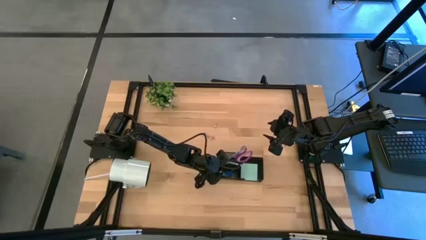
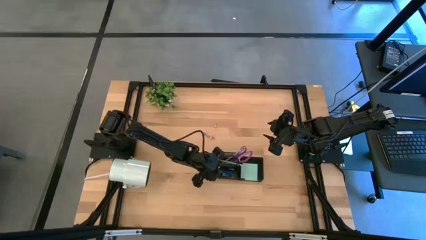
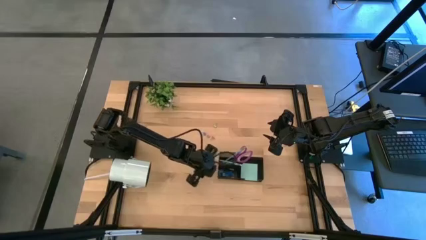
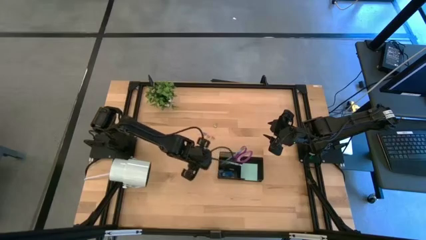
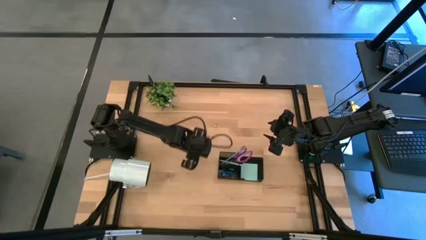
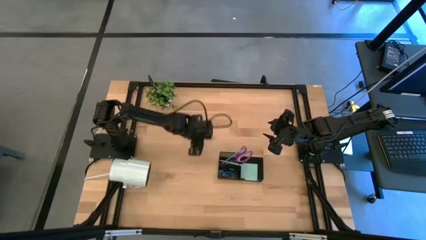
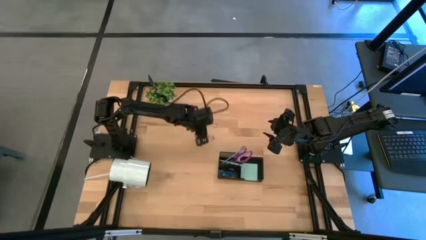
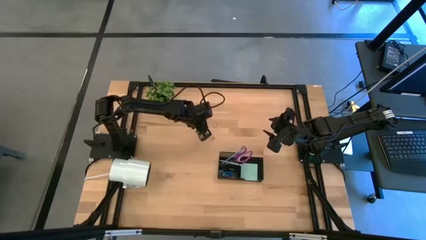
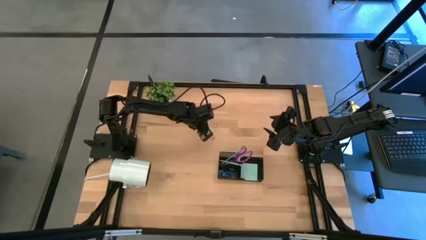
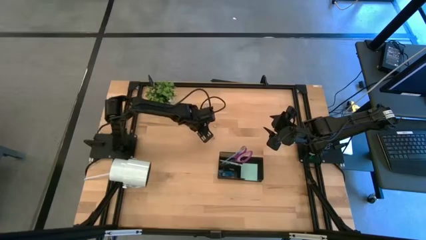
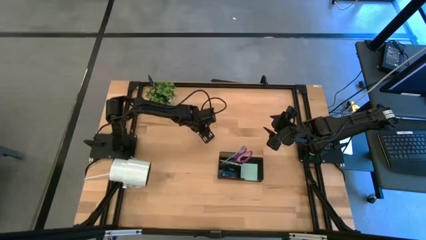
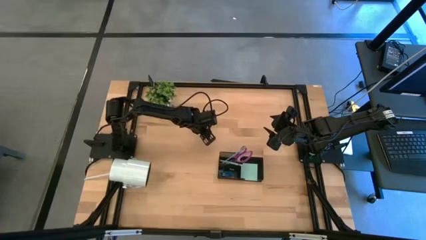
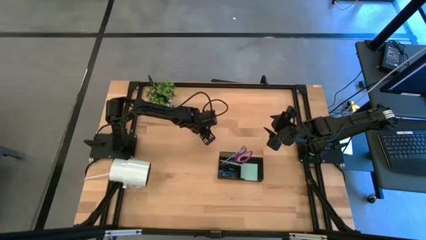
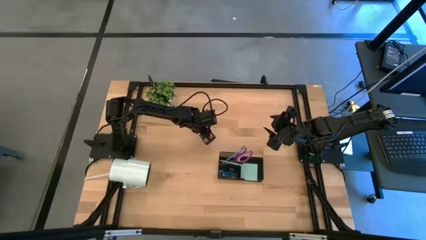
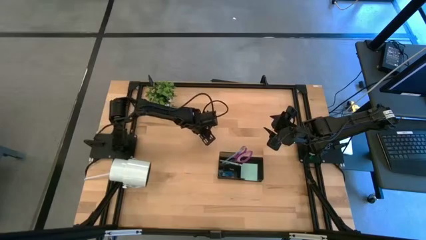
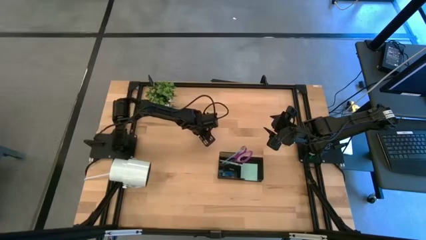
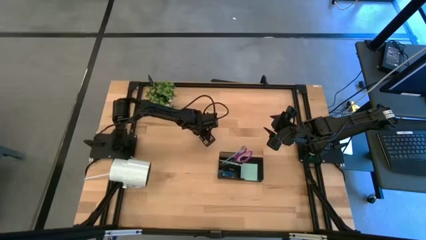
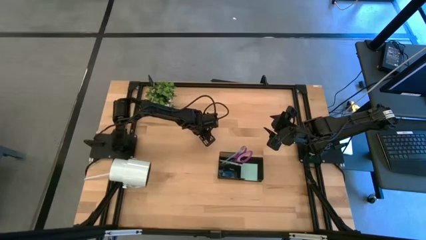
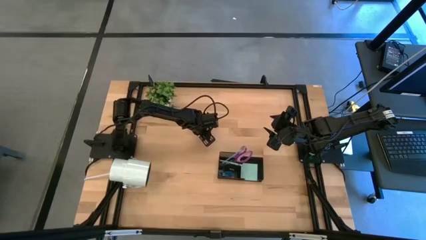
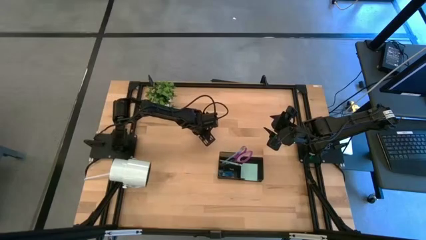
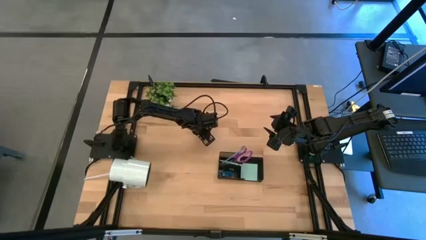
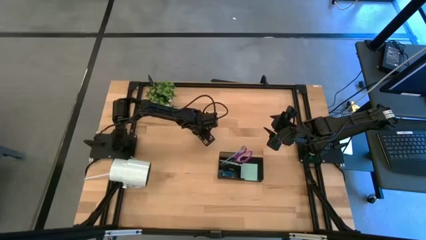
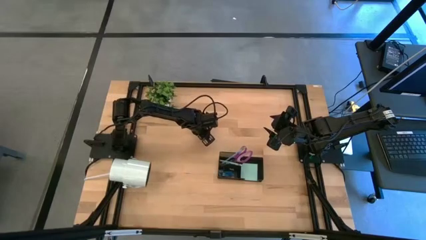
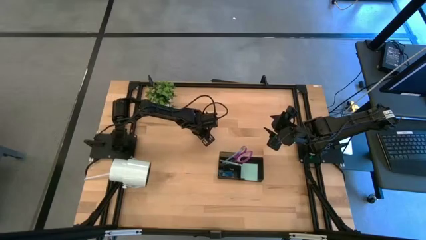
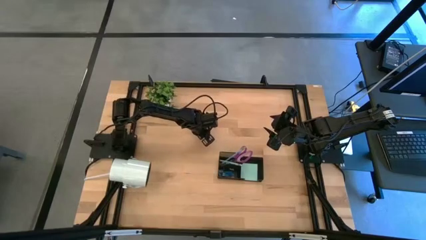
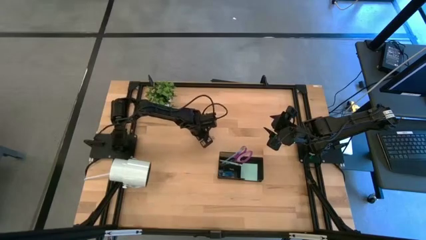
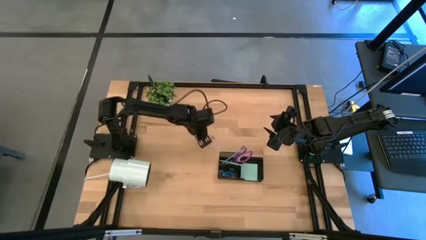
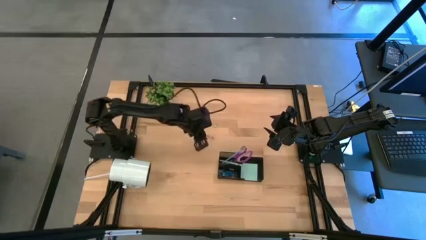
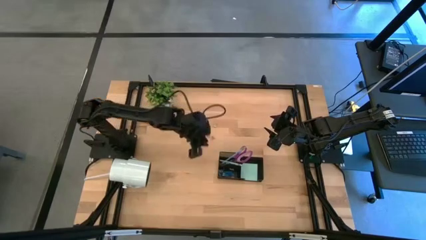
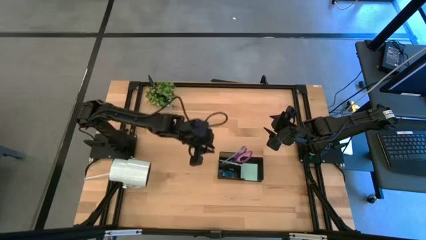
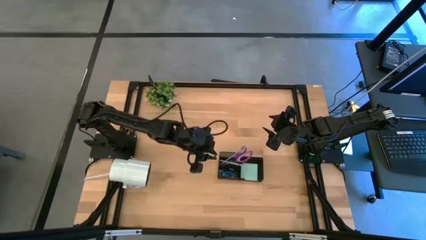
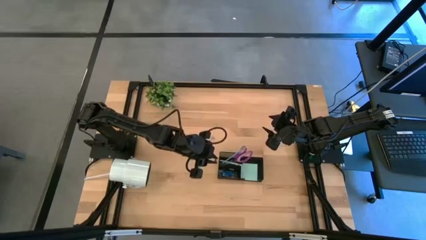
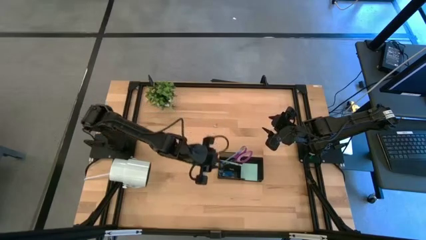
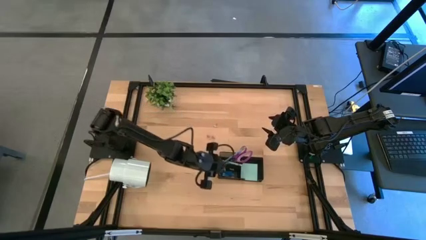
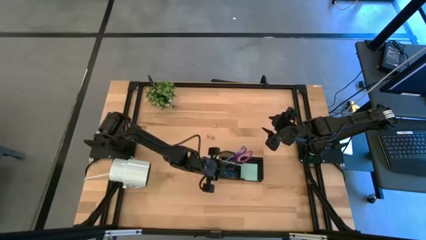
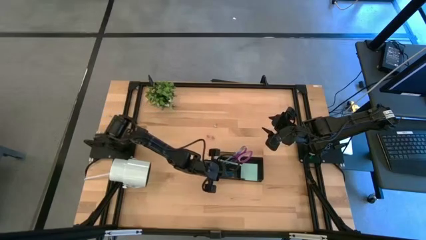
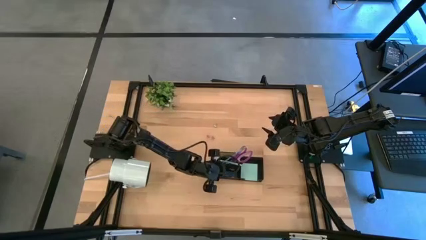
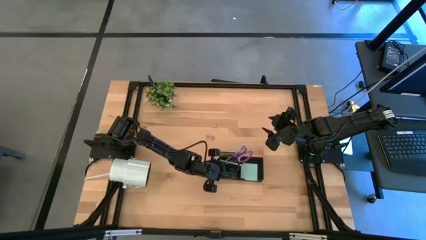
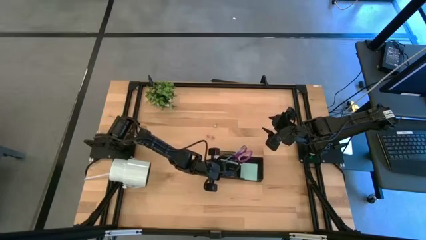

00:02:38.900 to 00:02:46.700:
Task: Pick and place office supplies into organizer
Put the blue binder clip into the desk organizer

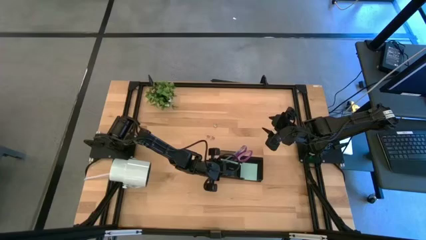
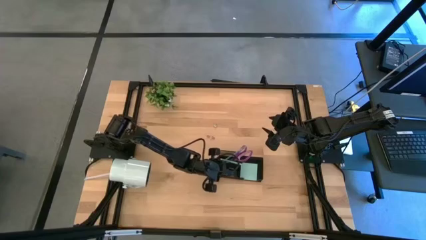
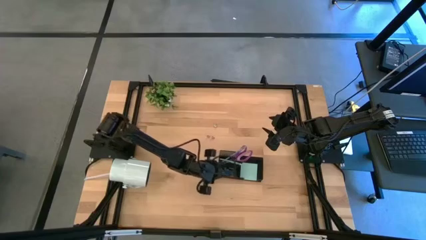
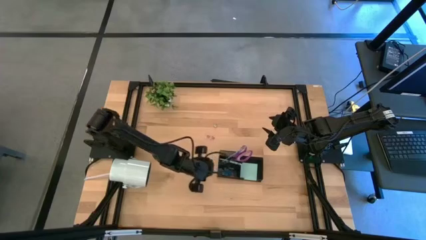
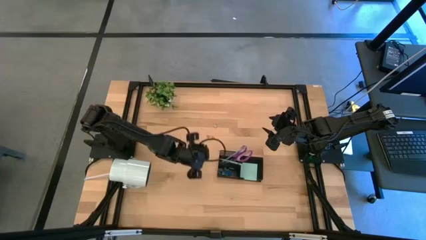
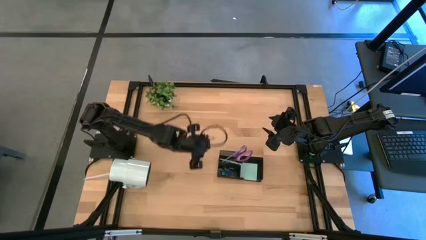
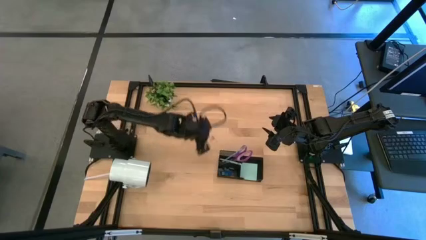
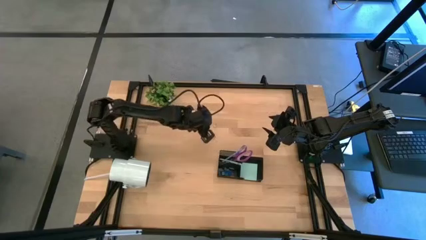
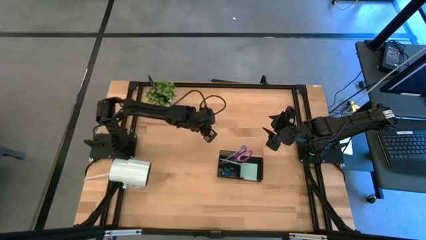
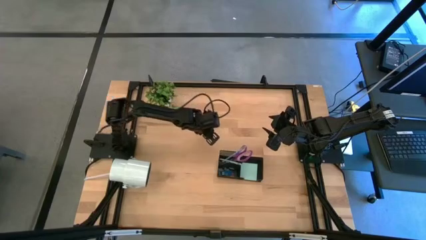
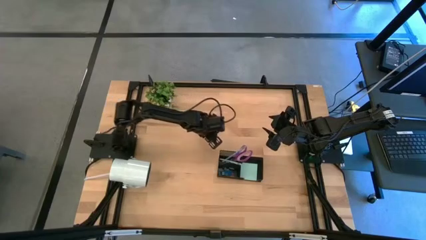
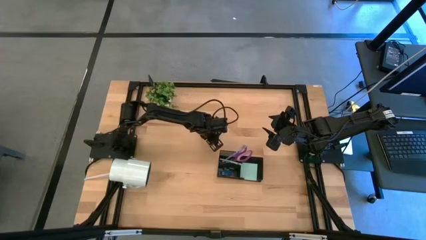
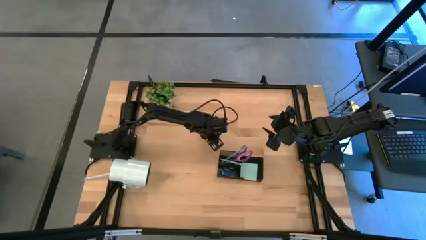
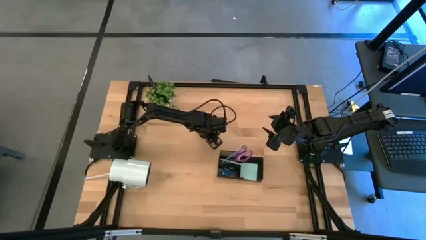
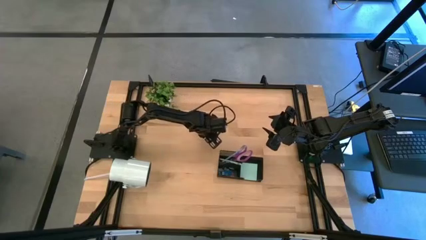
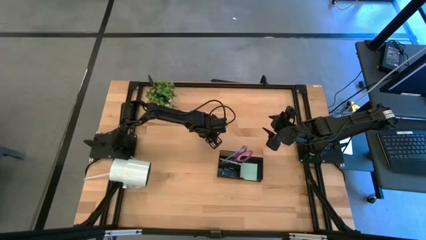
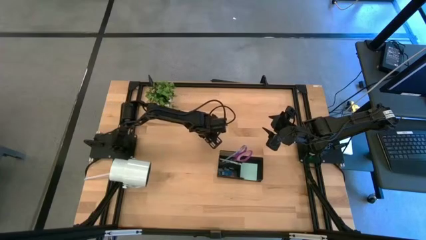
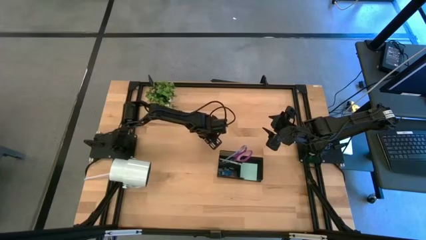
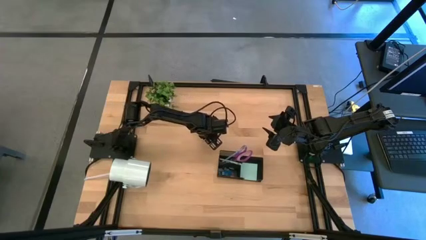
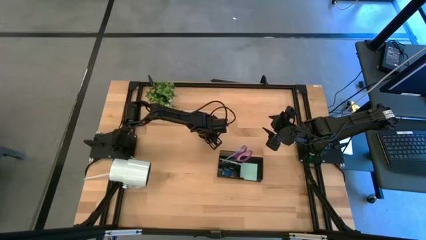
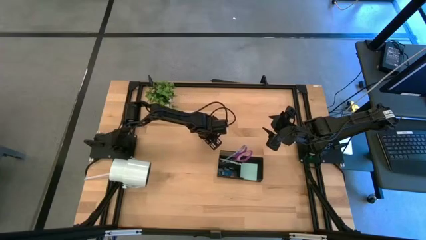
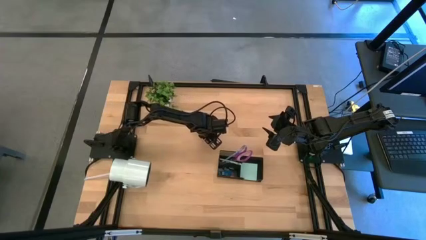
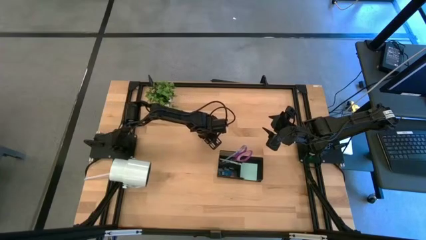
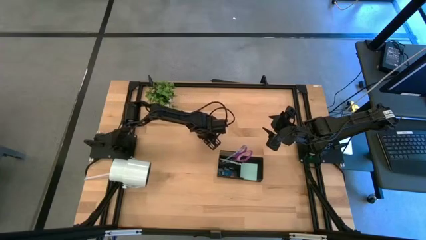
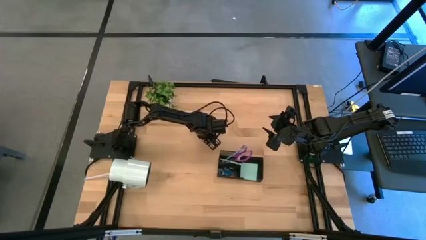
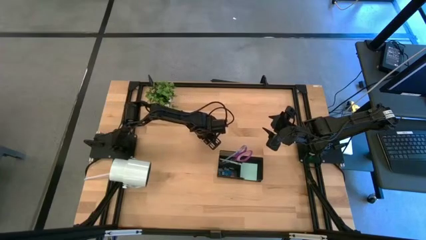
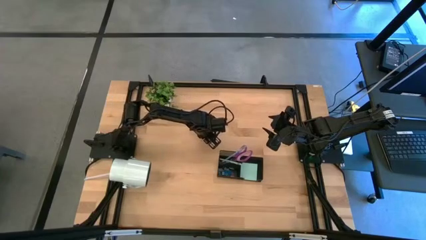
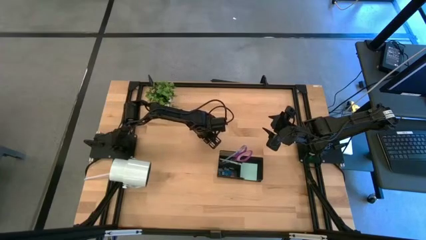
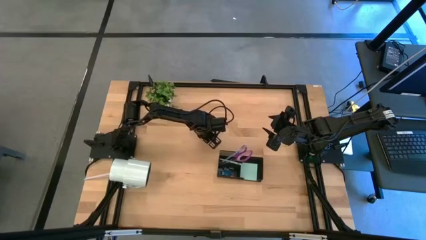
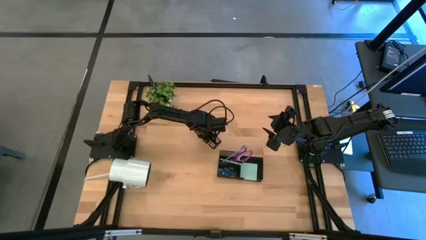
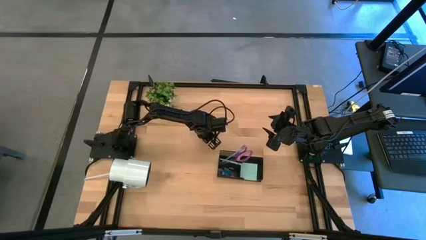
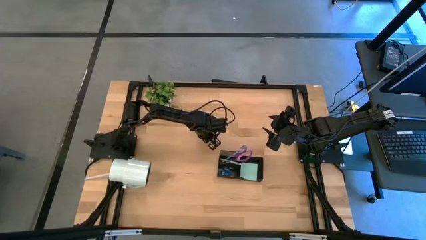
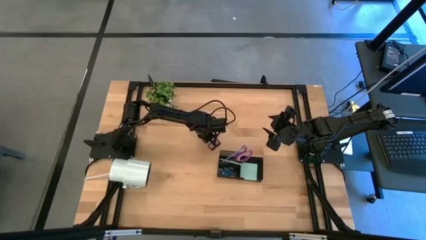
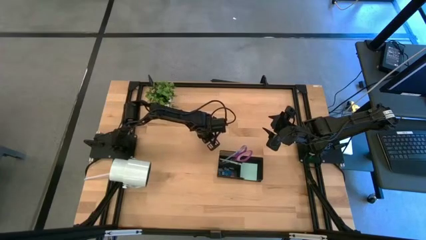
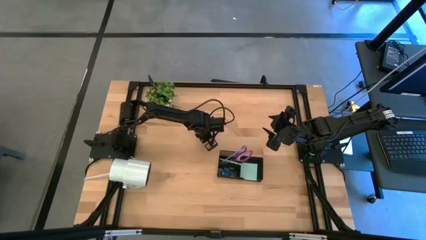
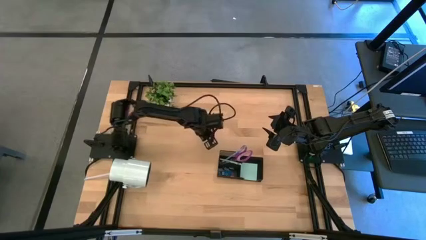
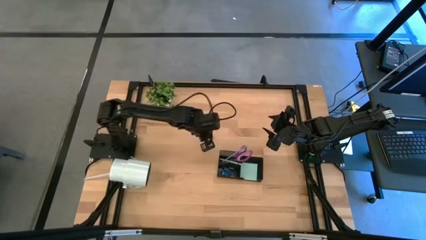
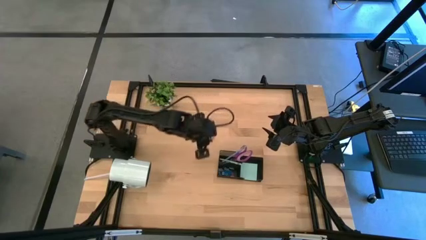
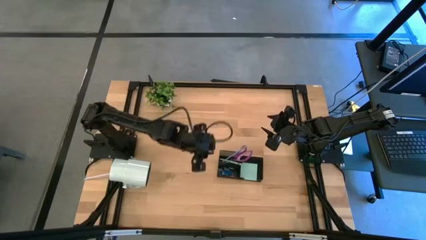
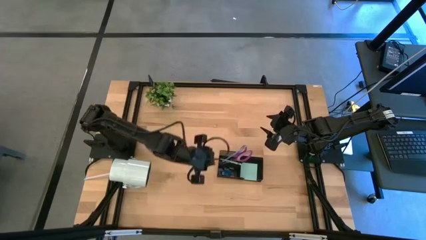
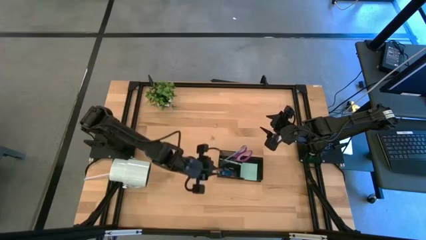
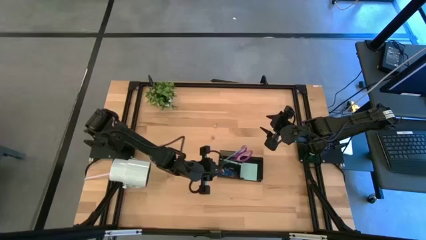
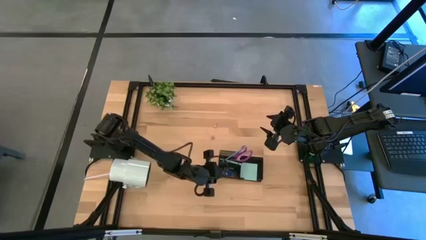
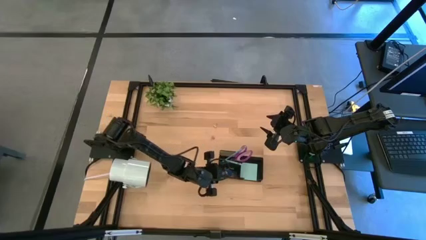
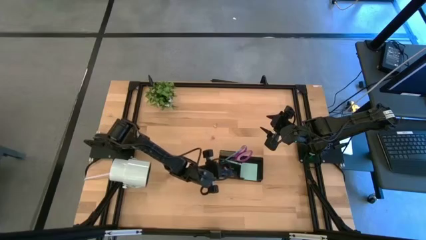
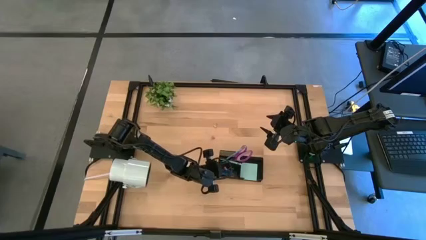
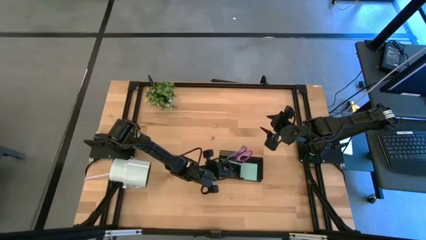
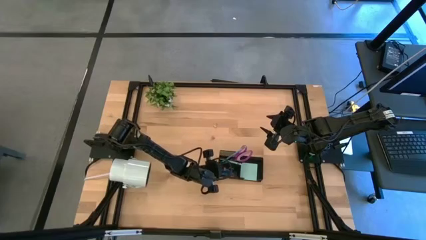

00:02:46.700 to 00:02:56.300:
Put the bottom left pink binder clip into the desk organizer
